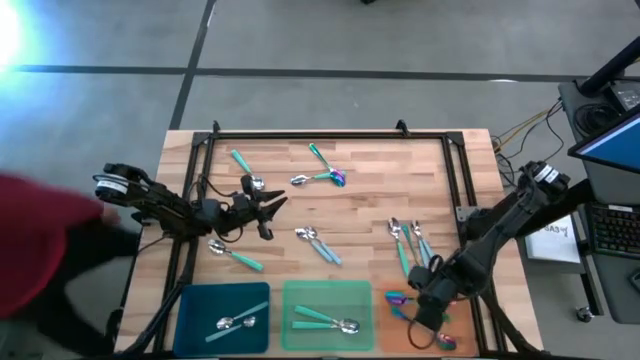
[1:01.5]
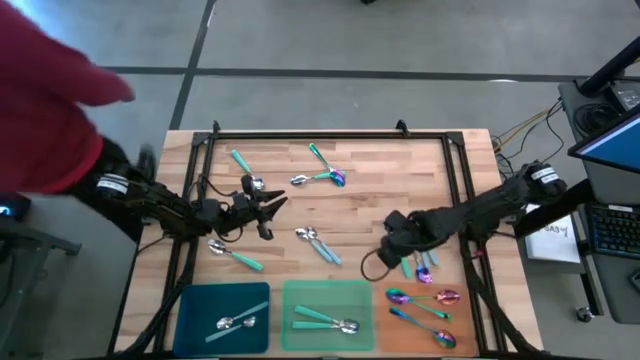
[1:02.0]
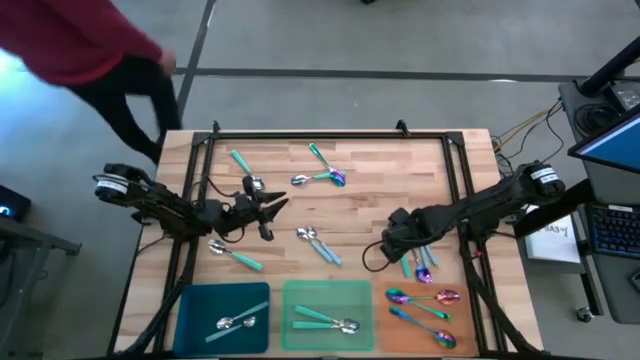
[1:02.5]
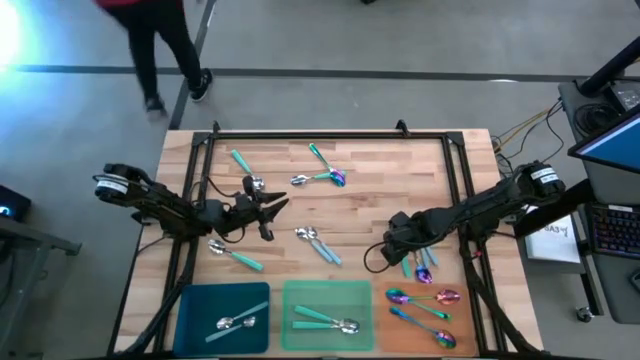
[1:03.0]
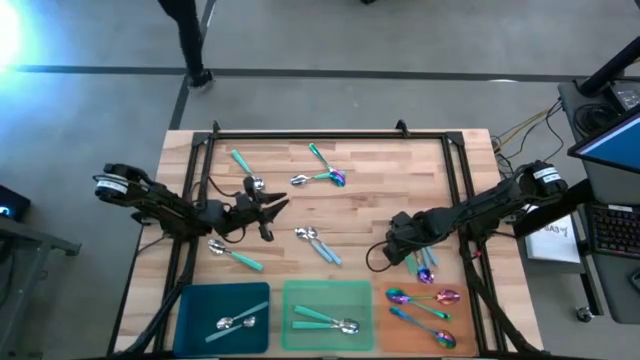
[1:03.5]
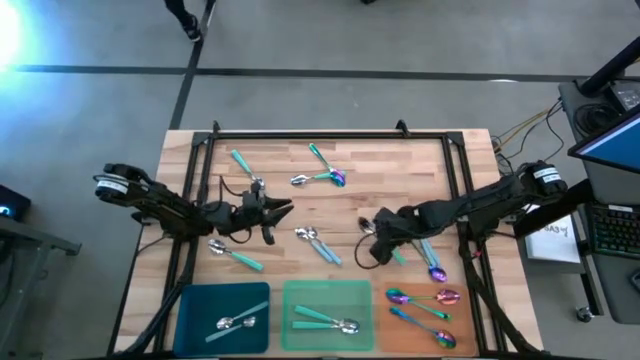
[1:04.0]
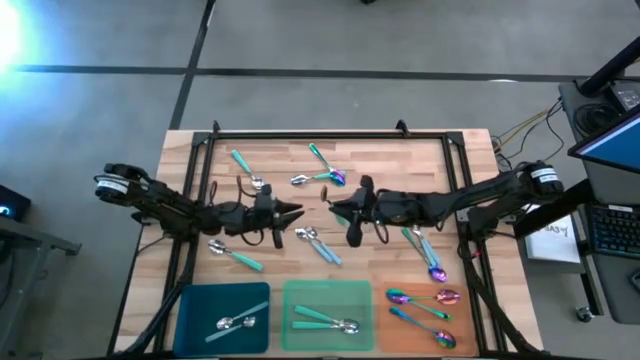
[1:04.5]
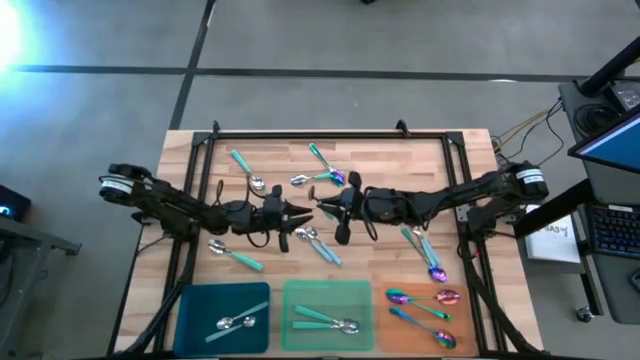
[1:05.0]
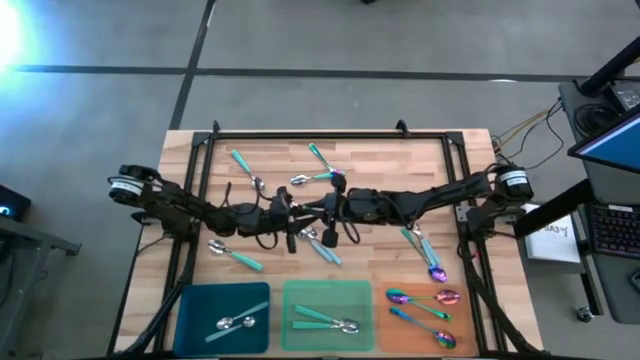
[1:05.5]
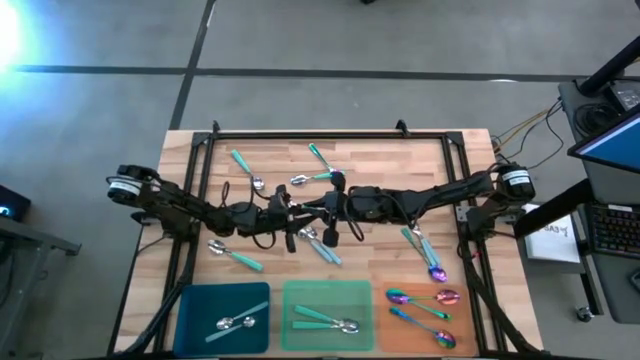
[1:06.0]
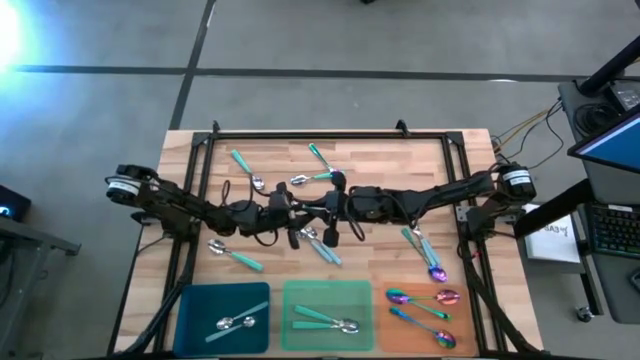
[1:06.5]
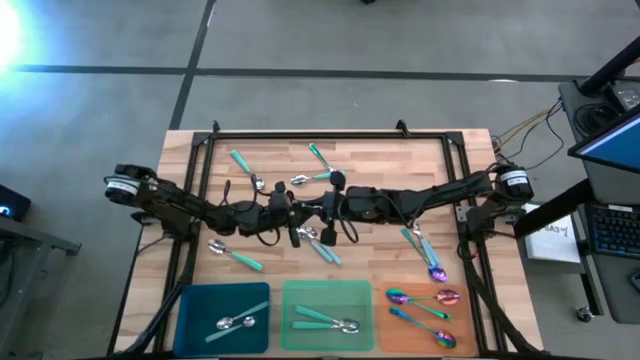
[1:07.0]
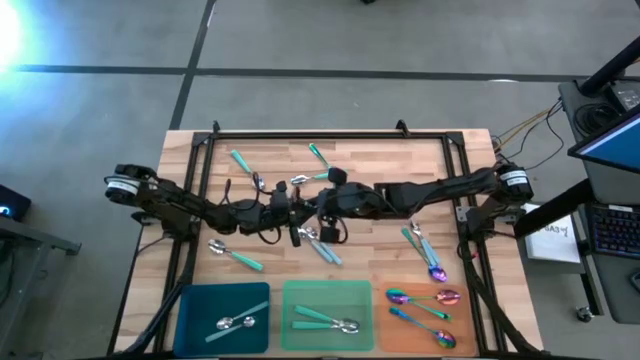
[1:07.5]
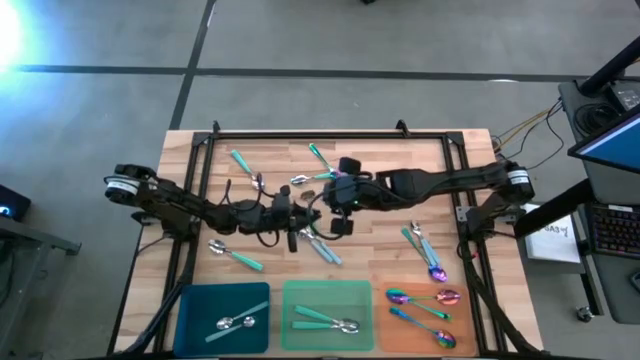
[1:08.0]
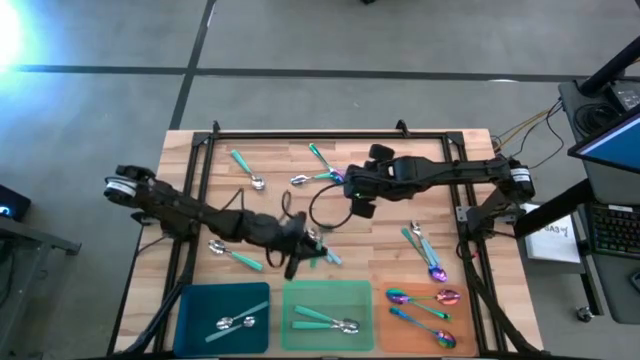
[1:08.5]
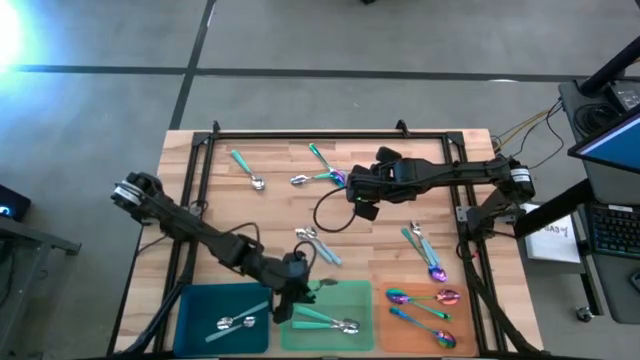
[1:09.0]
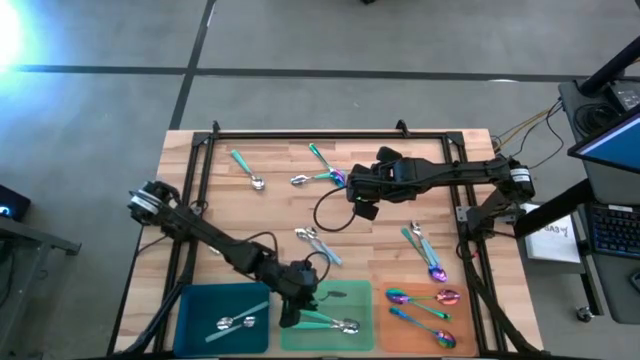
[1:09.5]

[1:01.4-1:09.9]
Task: Sort silverware by color (type)
Put the light green spoon into the light green bin

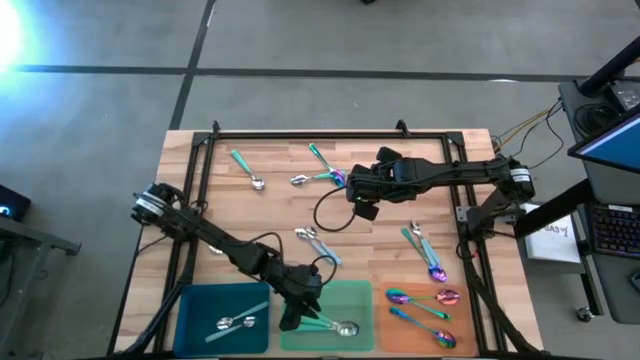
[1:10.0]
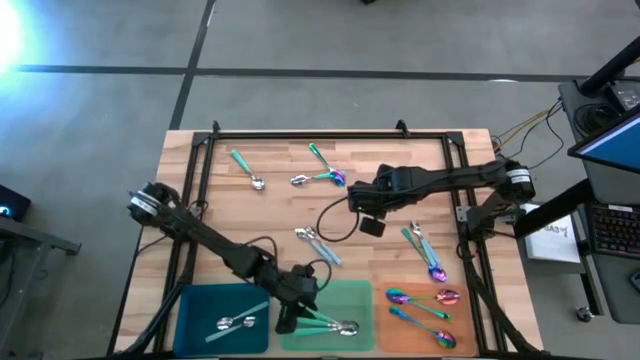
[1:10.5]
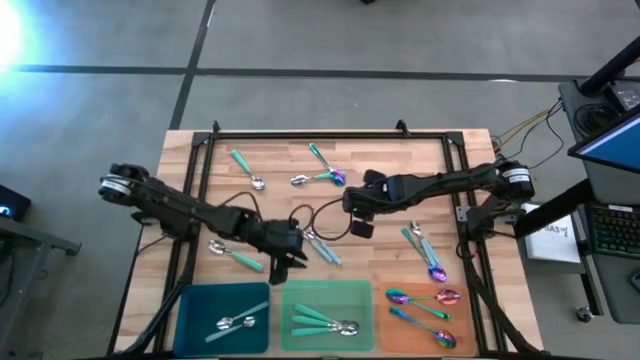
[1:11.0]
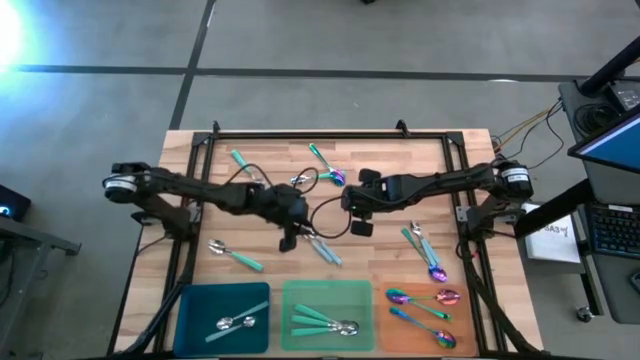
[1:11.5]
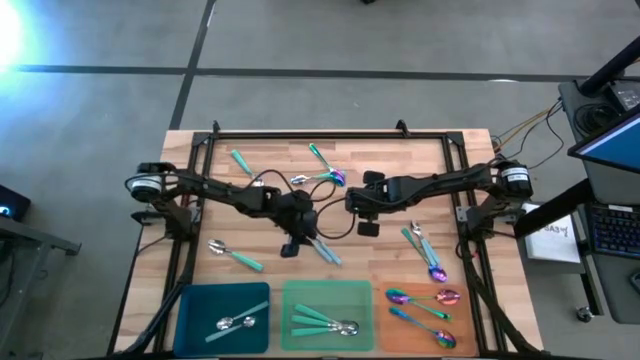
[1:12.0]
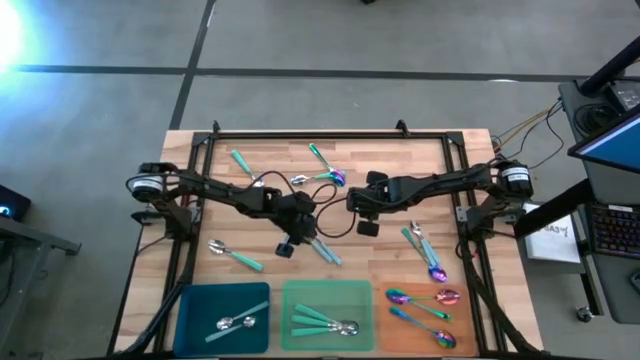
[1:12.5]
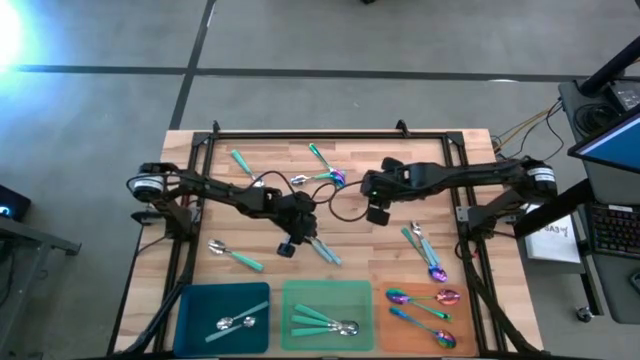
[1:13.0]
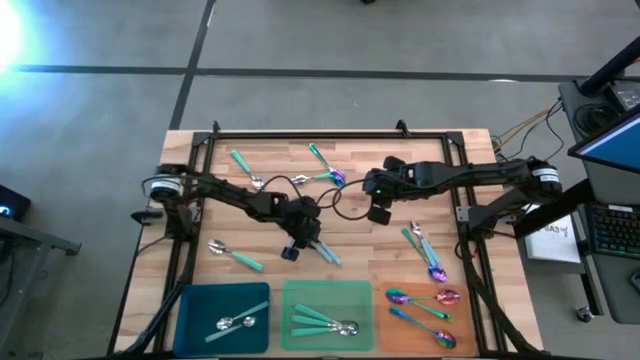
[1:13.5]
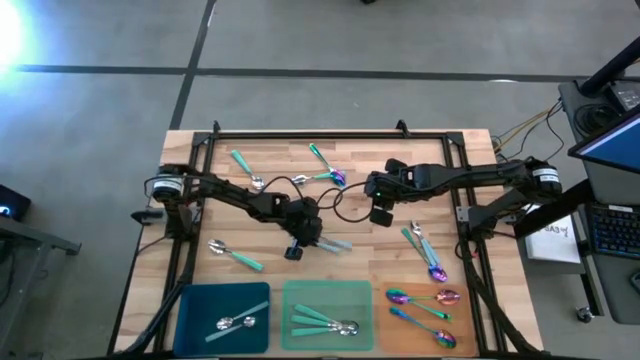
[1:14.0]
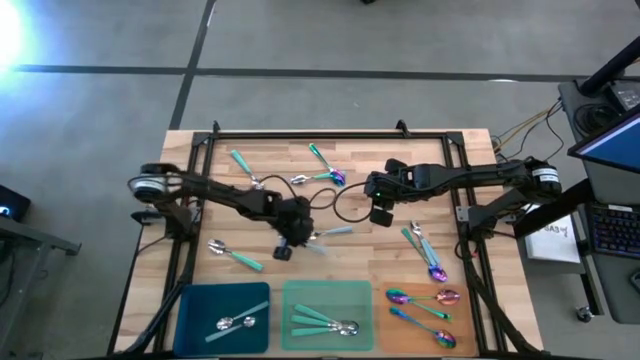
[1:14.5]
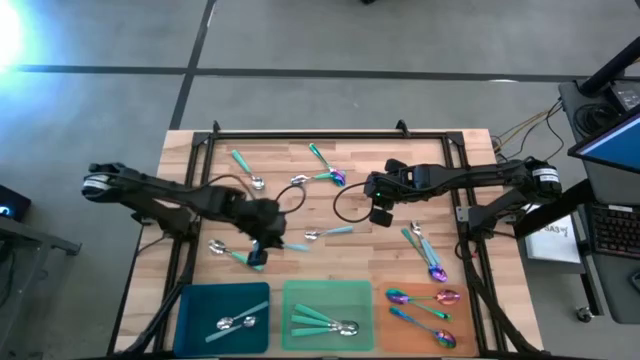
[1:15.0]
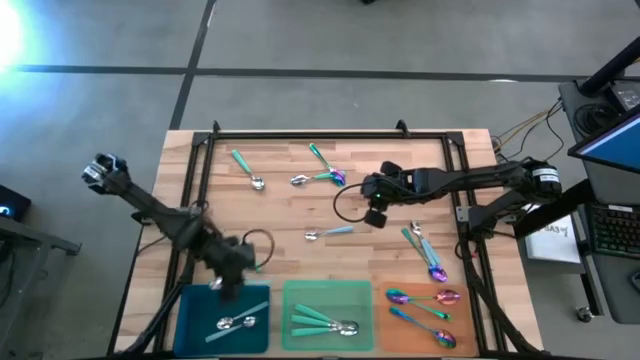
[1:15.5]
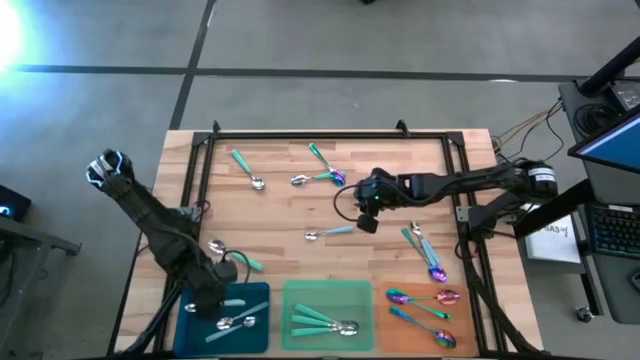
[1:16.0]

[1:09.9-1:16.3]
Put the light blue spoon into the blue bin

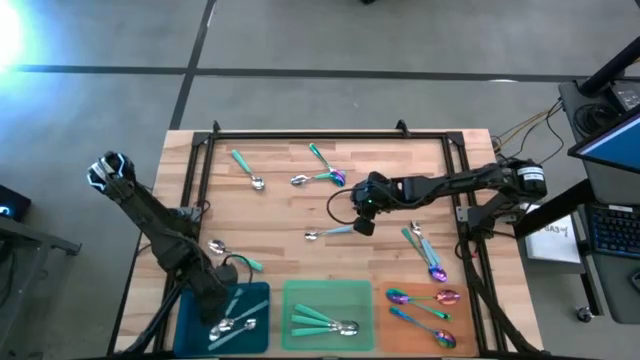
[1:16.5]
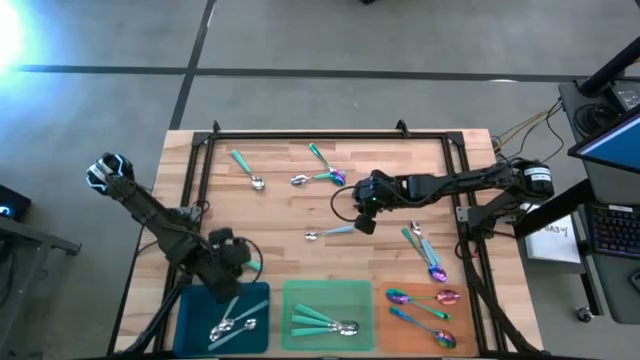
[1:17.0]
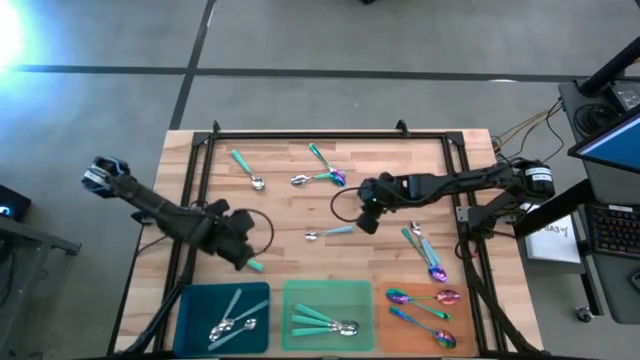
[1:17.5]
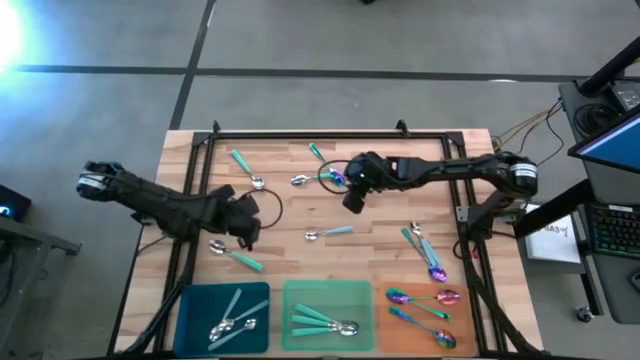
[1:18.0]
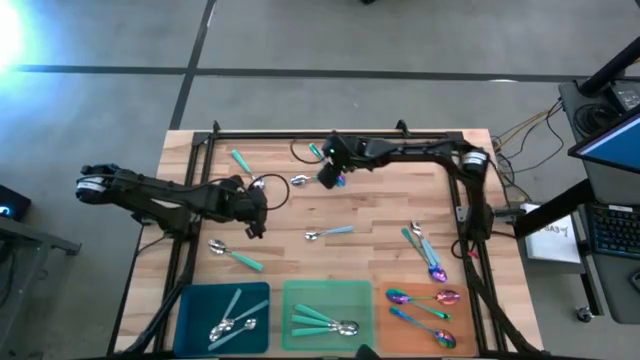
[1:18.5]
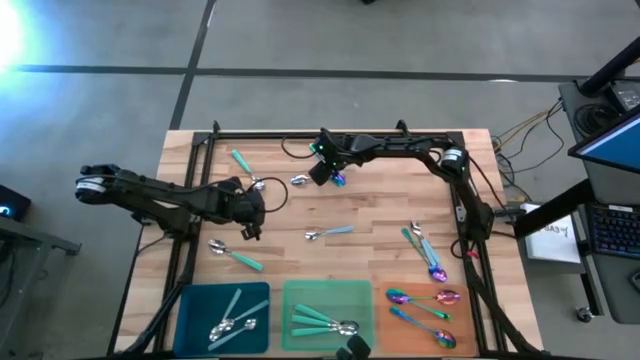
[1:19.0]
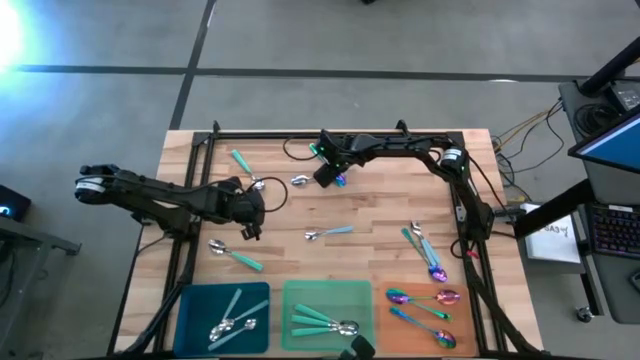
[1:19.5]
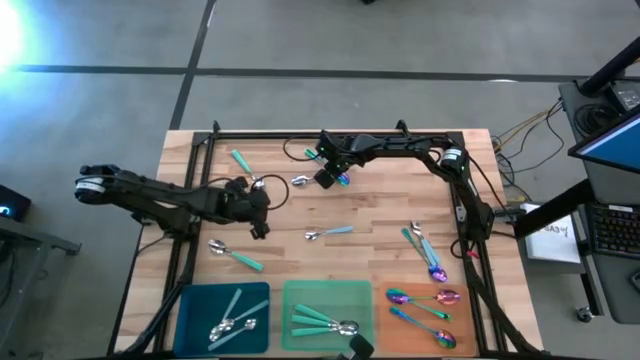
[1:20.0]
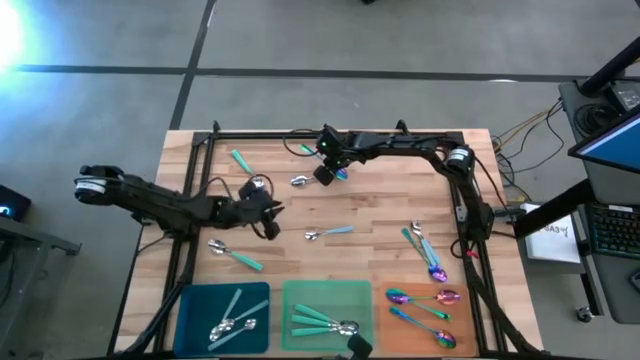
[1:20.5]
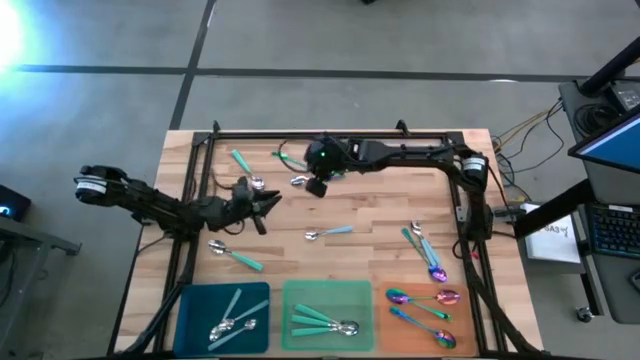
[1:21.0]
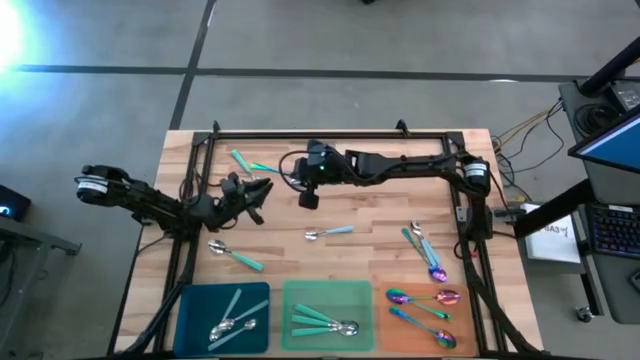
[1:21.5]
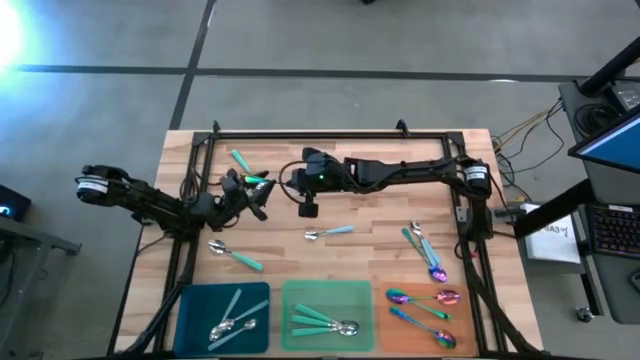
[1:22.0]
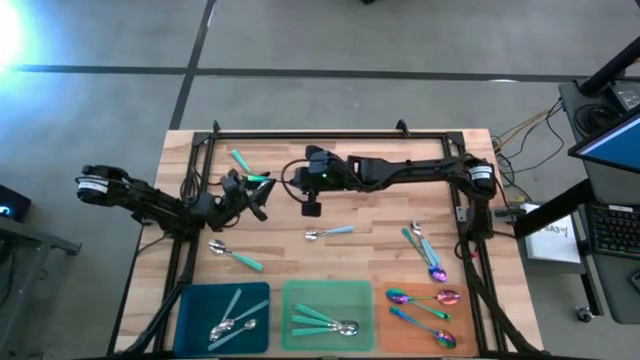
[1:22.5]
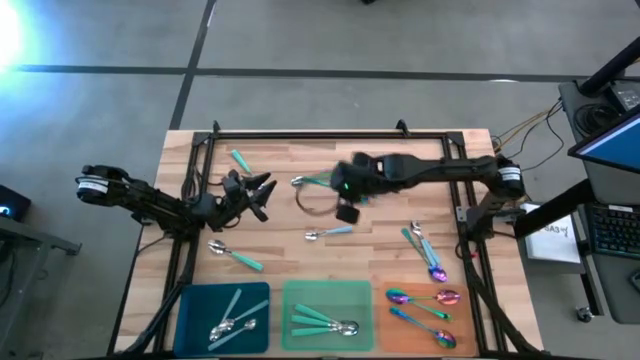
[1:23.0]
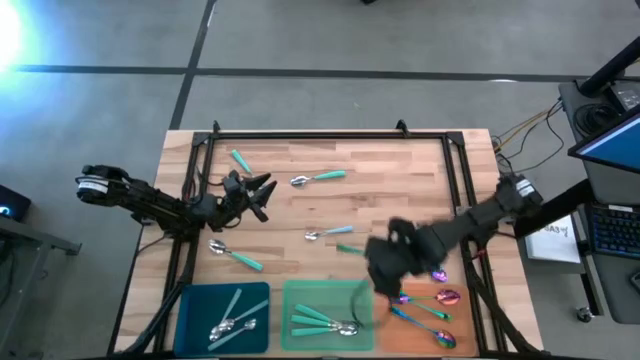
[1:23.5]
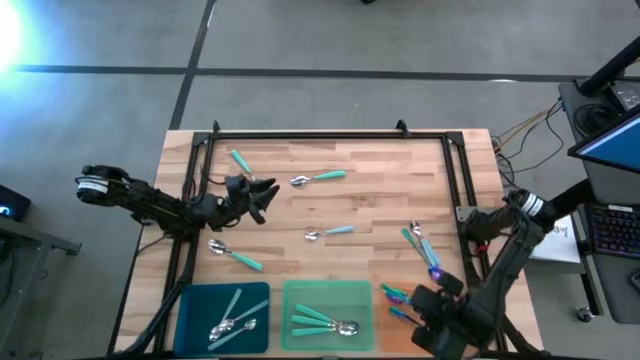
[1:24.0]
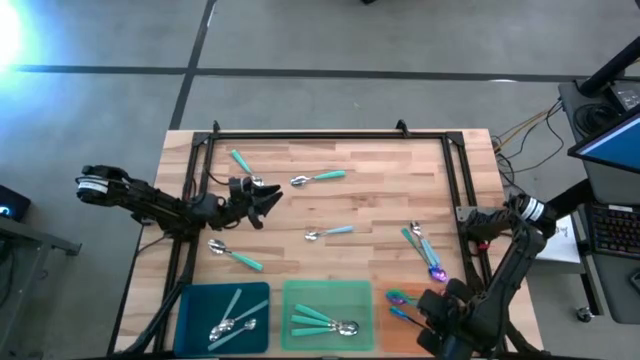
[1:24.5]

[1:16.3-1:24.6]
Put the blue spoon into the orange bin
